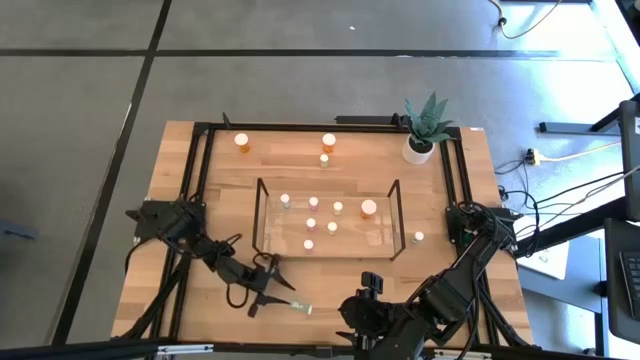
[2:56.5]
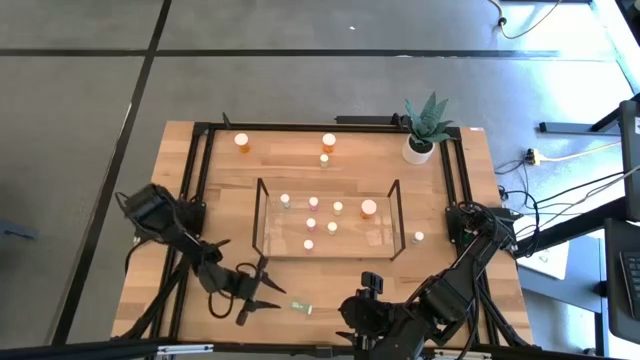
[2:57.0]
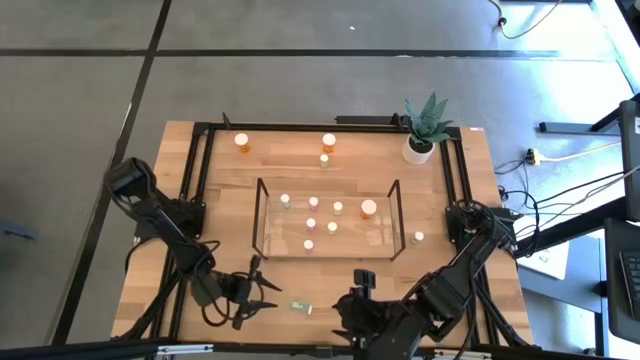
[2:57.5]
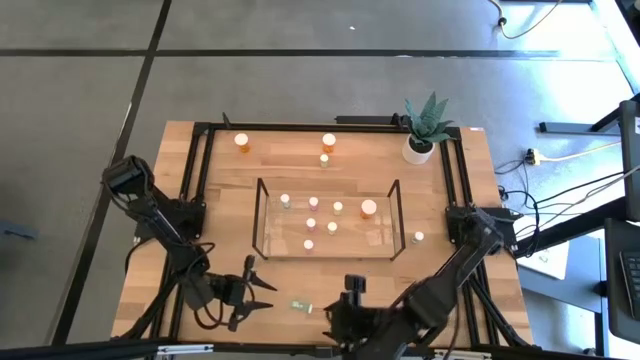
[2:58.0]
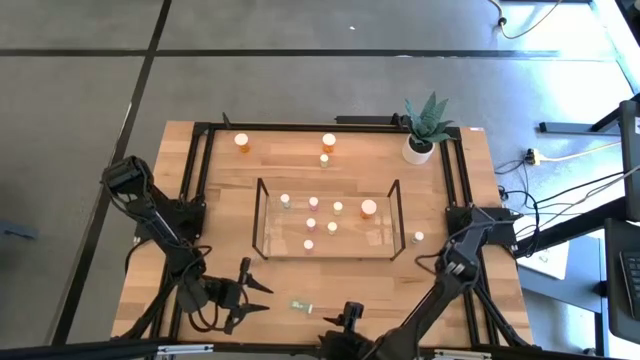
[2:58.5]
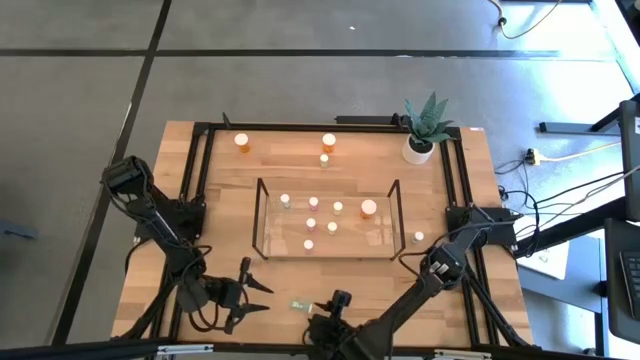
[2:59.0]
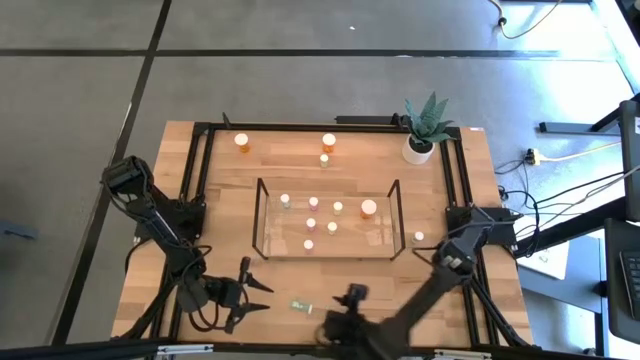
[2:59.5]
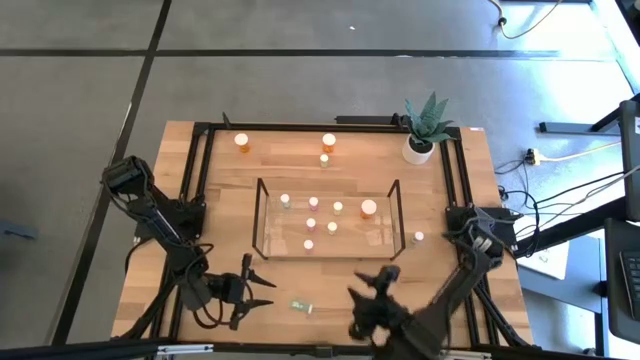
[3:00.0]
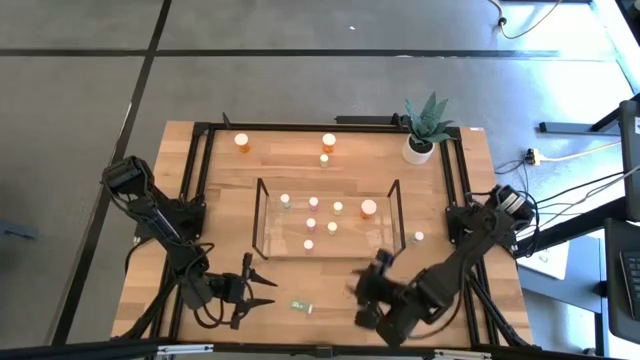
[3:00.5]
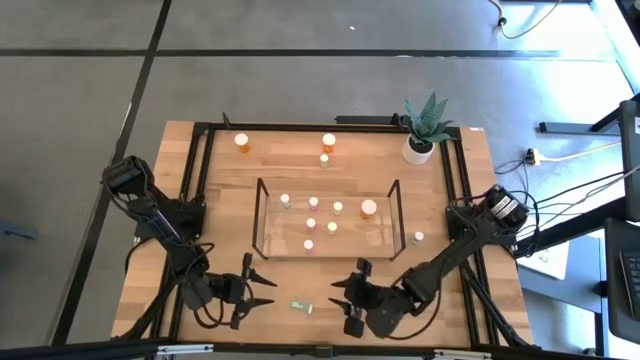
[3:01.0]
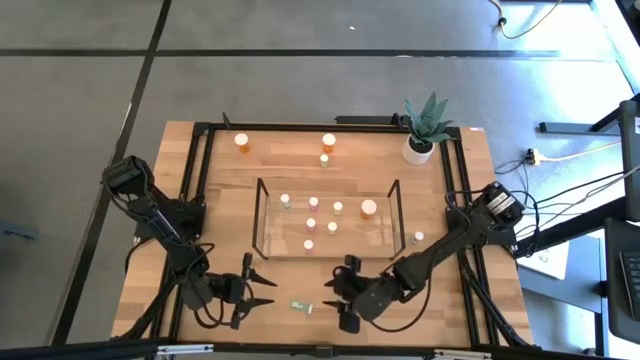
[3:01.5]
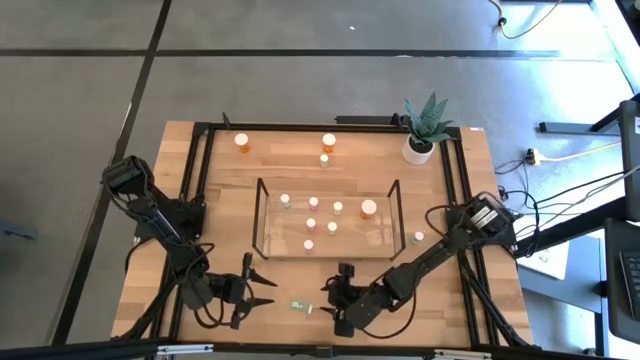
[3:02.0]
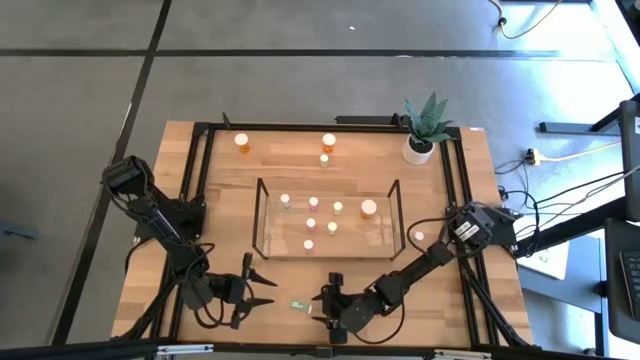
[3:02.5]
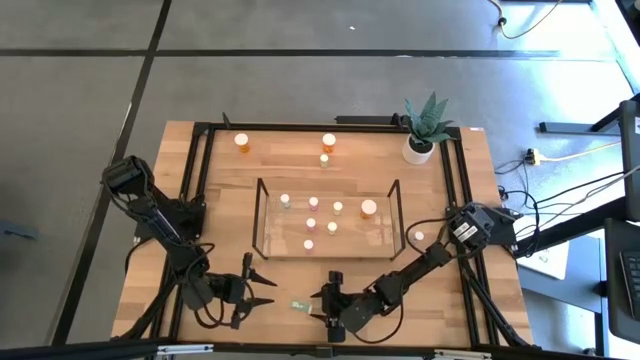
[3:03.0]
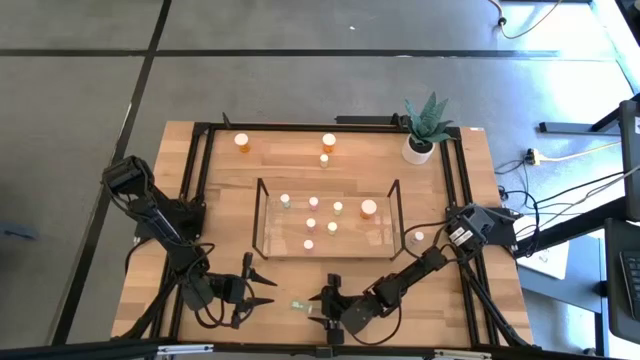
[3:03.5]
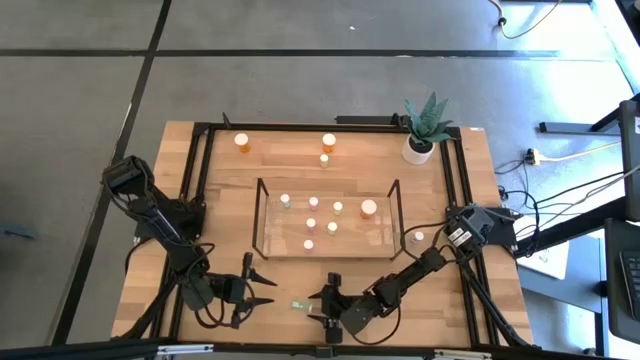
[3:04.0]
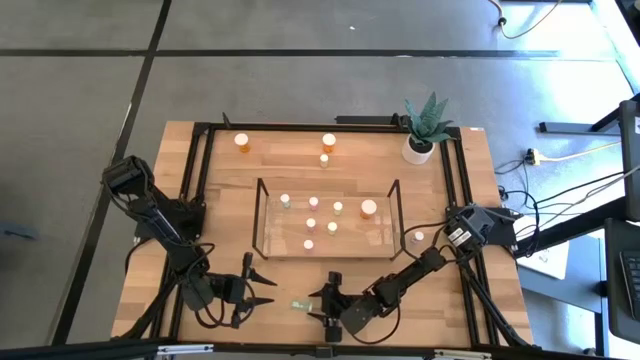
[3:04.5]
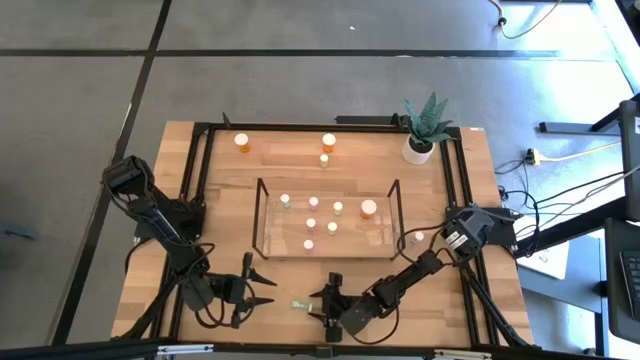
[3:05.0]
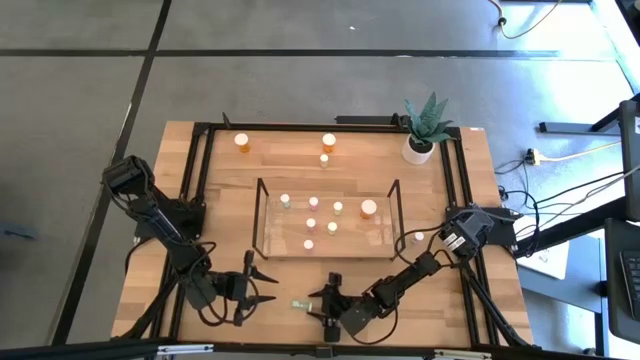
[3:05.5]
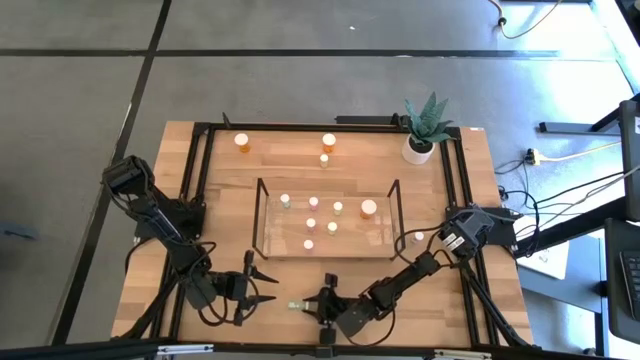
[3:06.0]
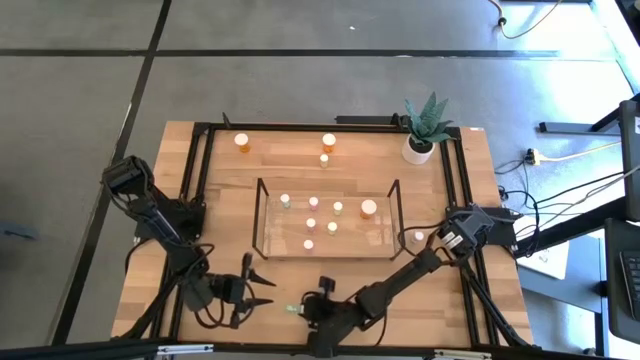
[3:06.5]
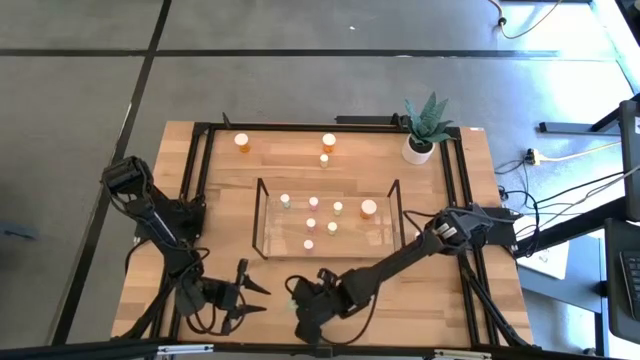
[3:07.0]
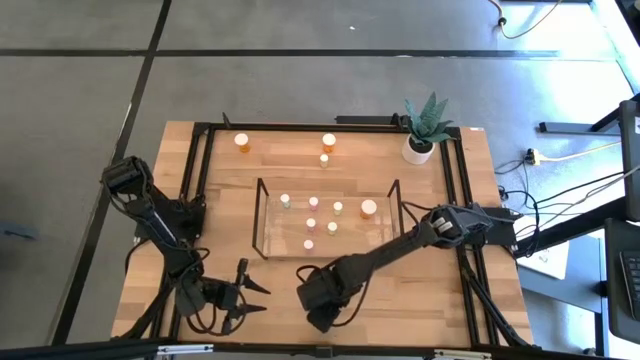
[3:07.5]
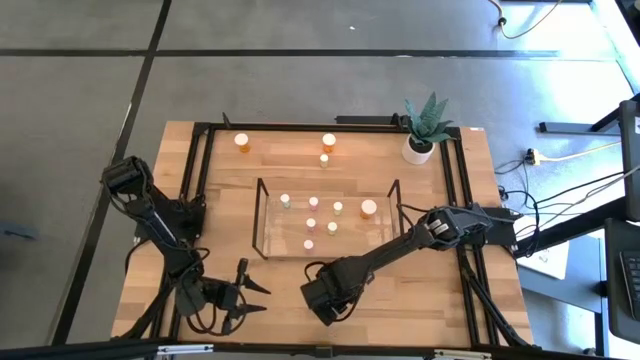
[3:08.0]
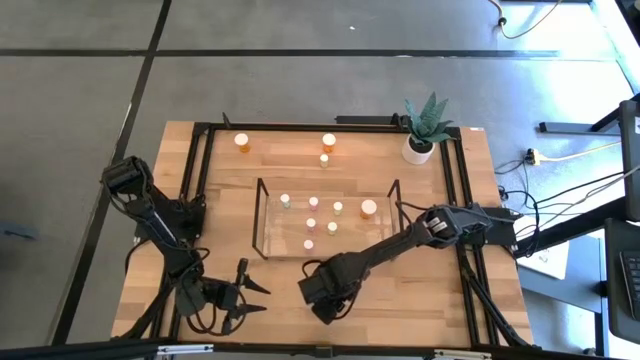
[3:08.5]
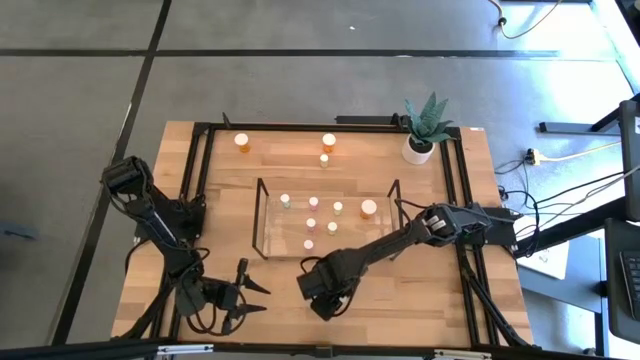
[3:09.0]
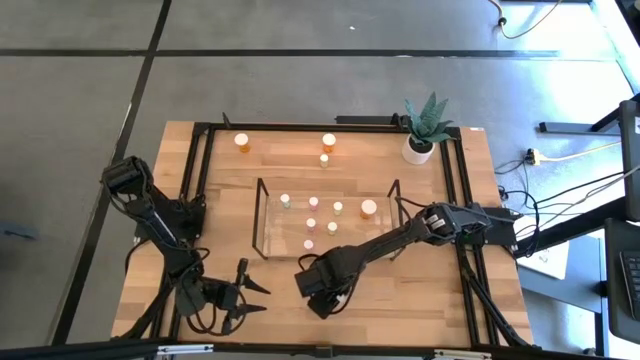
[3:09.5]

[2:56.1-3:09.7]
Task: Pick and place medicine bottles onto shelf by color
Put the bottom blue pill bottle on the shelf aligned with the other blue pill bottle

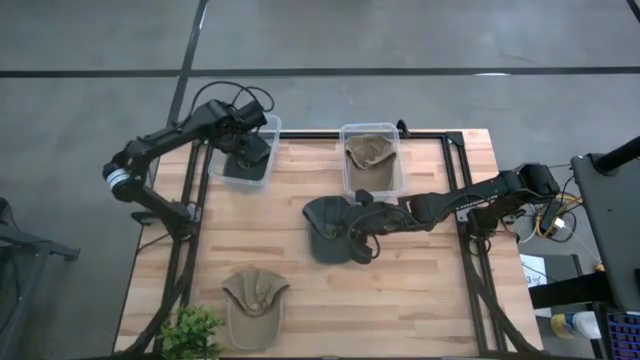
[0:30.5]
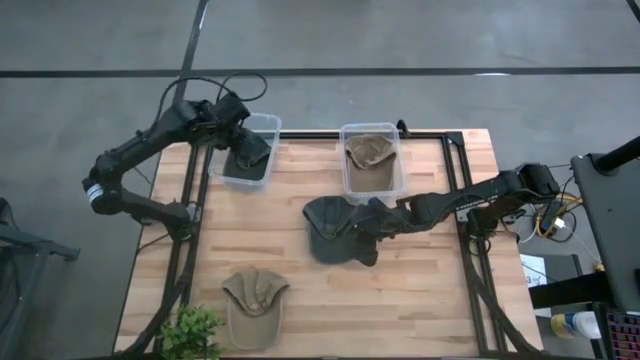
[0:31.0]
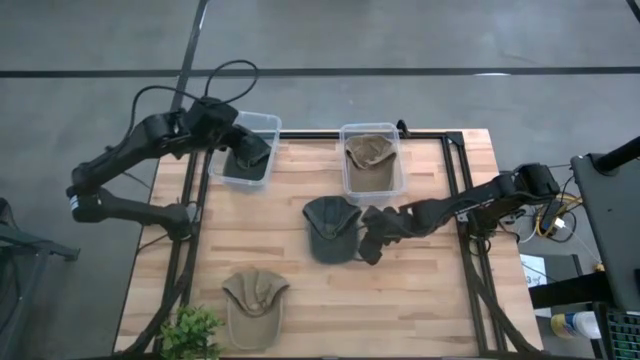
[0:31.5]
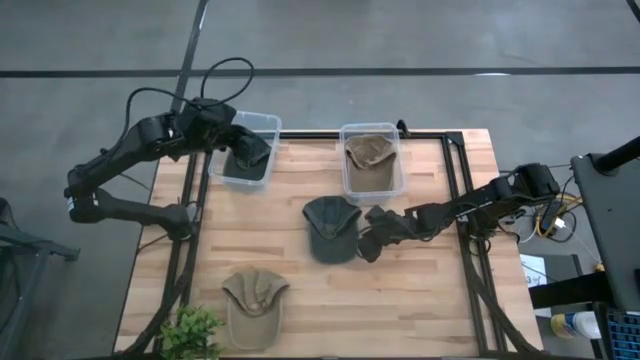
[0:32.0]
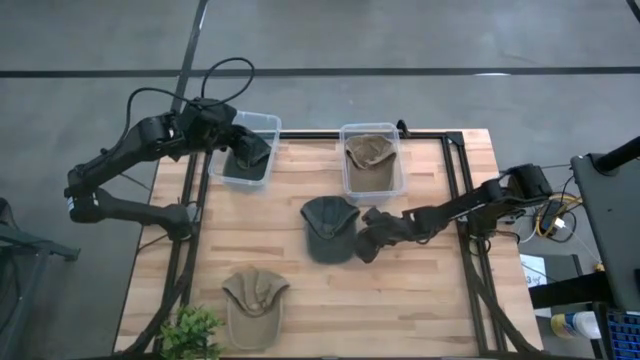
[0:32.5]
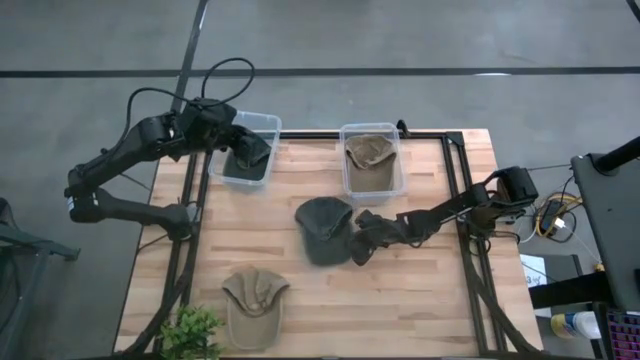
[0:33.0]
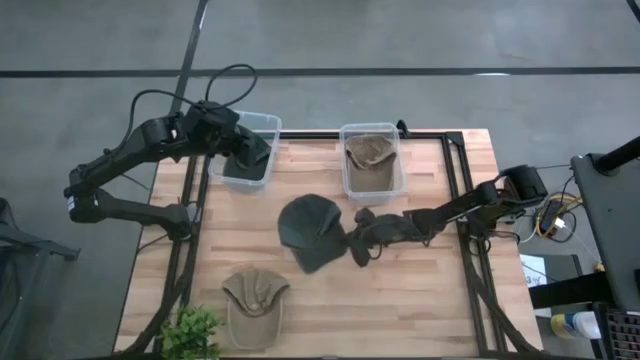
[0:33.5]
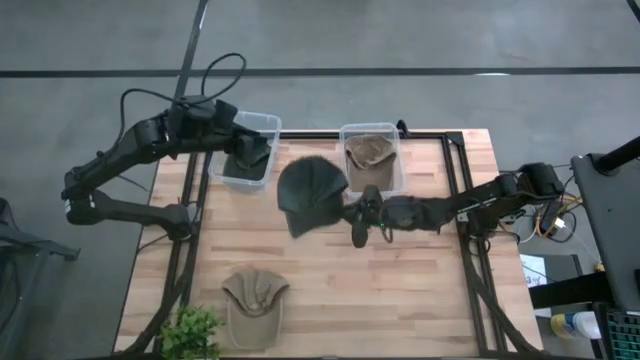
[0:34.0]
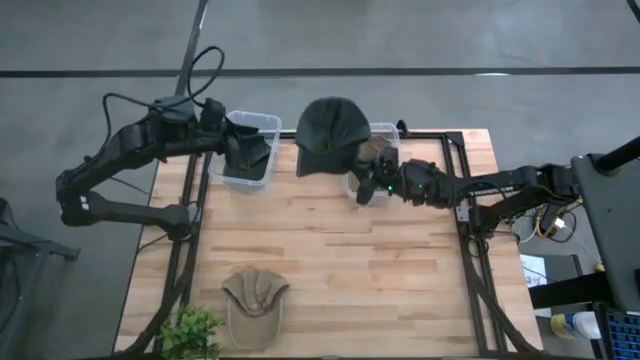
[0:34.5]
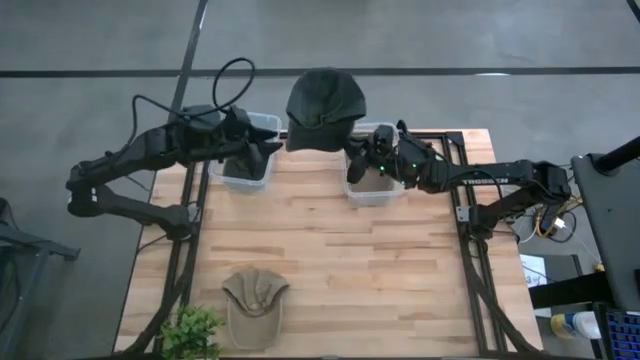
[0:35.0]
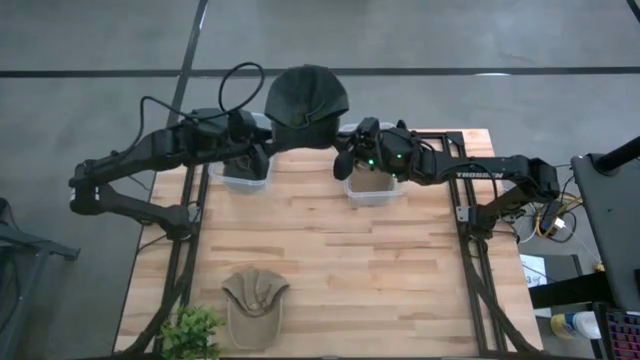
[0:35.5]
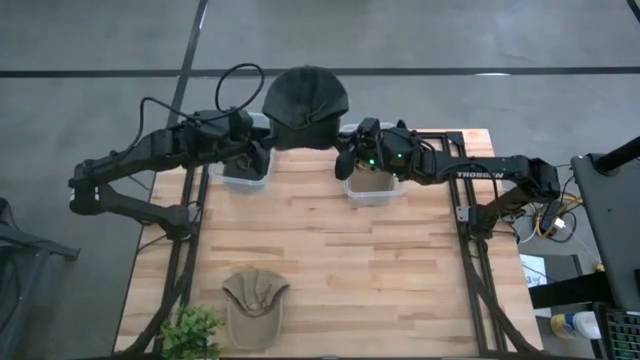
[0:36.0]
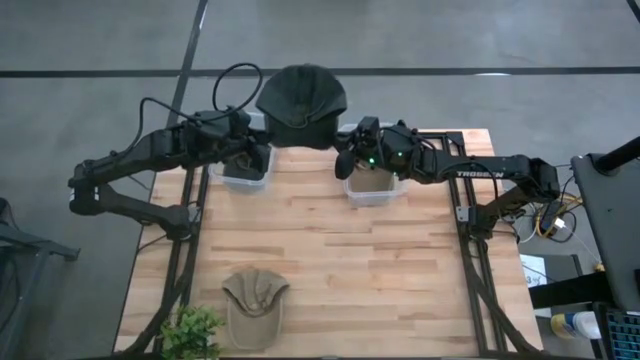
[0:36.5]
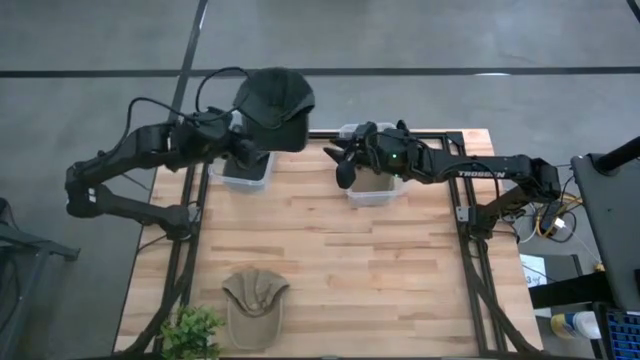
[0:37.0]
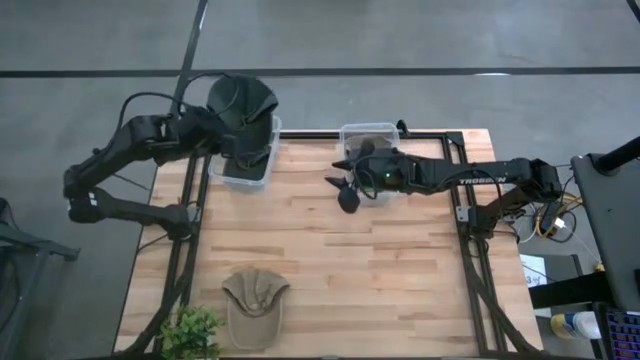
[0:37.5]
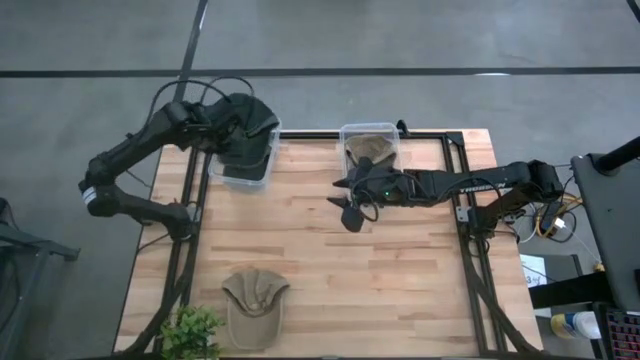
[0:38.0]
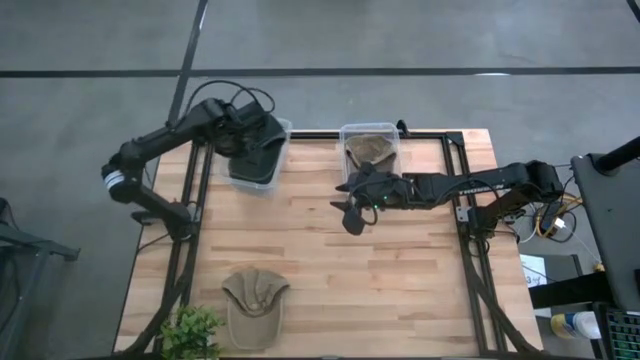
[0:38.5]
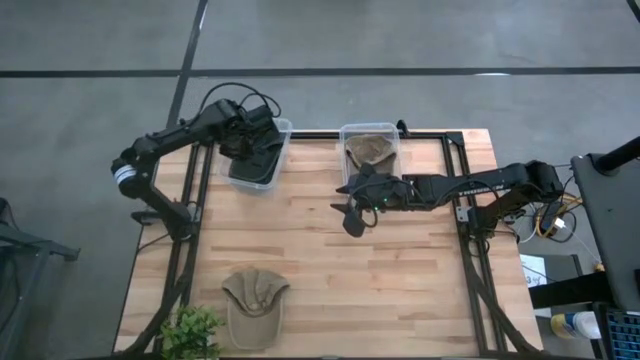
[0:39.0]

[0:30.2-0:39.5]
Task: Pick & Place hat
Put the black cap into the left transparent bin
